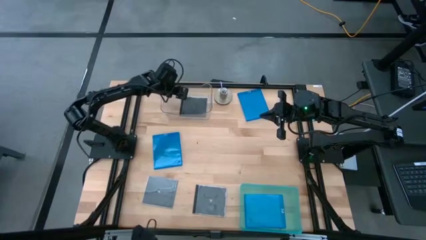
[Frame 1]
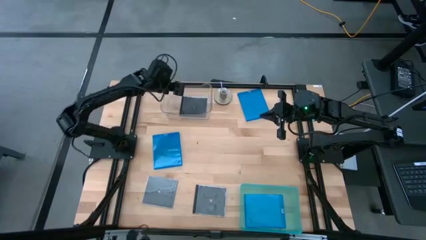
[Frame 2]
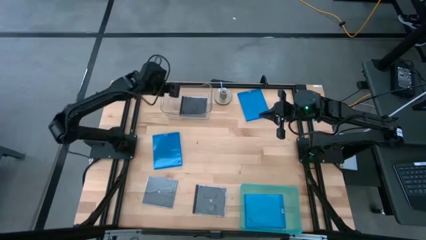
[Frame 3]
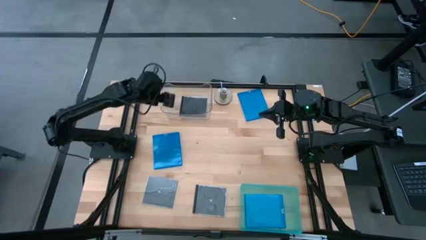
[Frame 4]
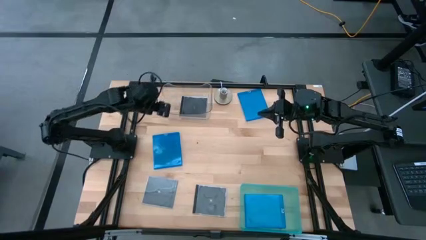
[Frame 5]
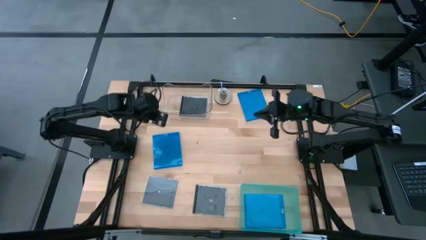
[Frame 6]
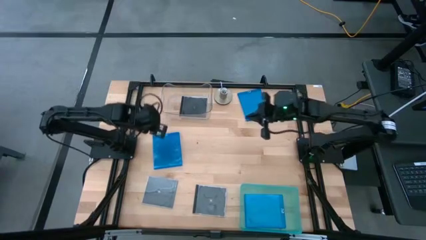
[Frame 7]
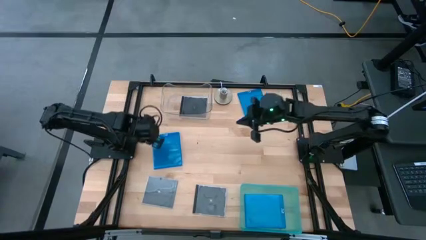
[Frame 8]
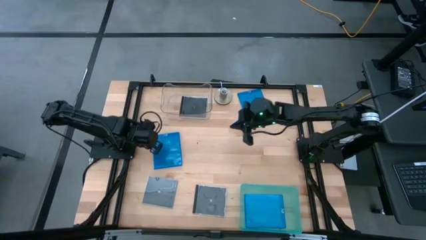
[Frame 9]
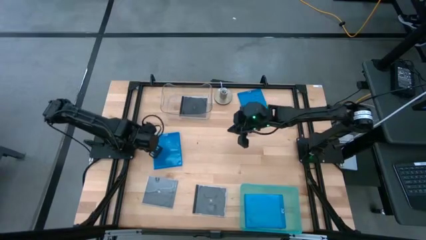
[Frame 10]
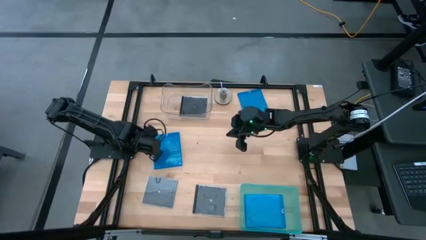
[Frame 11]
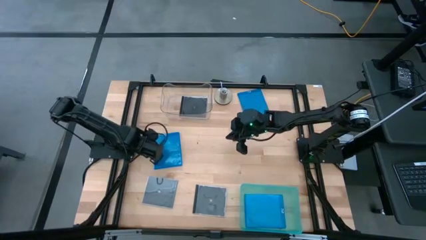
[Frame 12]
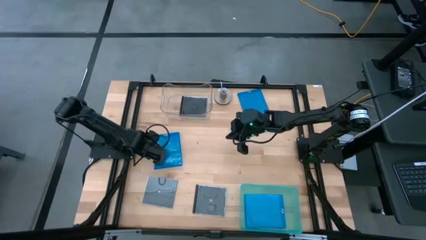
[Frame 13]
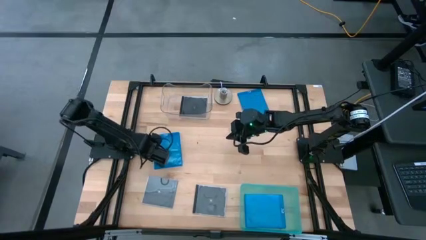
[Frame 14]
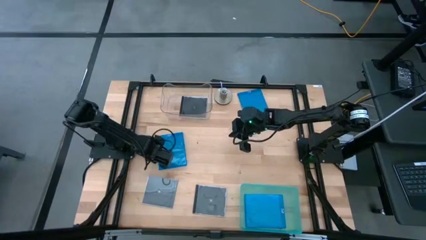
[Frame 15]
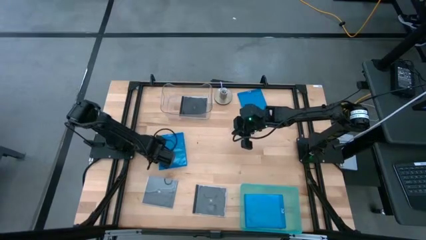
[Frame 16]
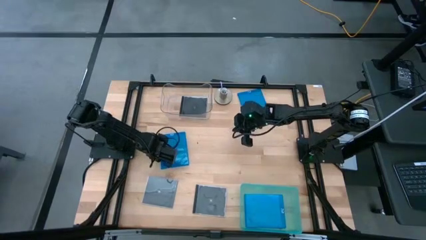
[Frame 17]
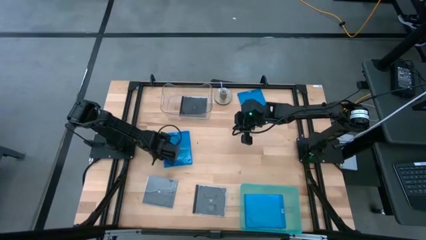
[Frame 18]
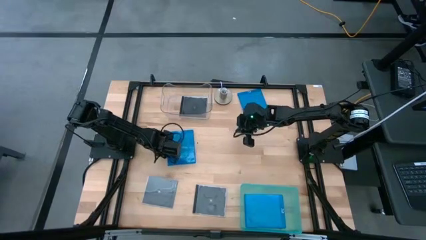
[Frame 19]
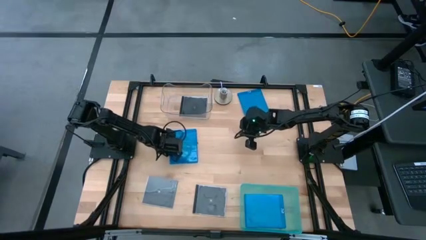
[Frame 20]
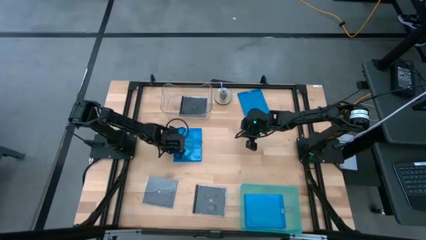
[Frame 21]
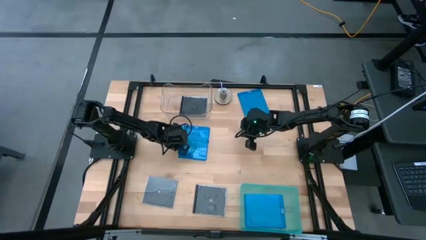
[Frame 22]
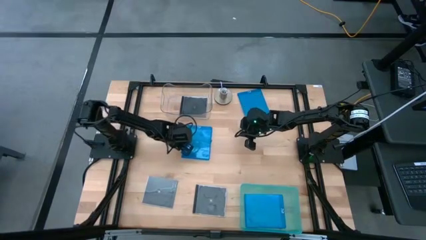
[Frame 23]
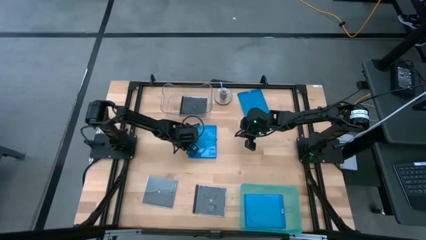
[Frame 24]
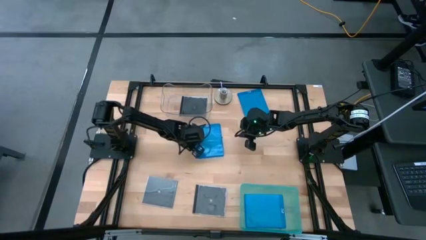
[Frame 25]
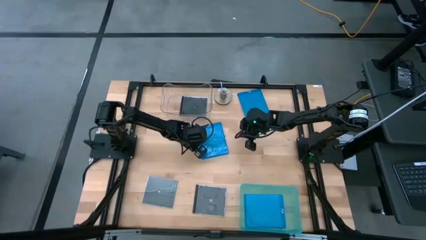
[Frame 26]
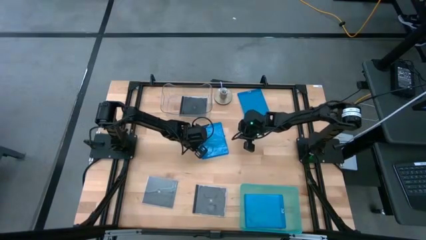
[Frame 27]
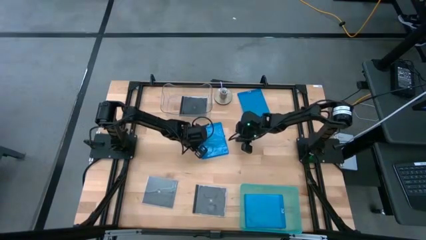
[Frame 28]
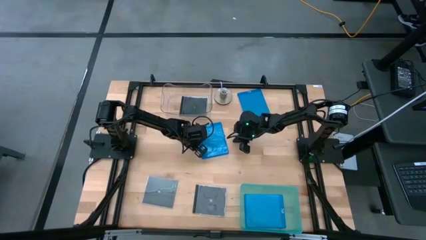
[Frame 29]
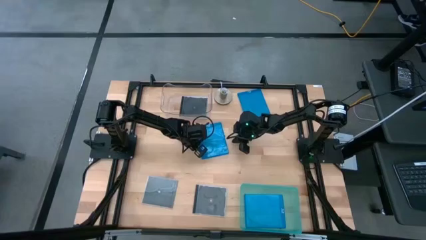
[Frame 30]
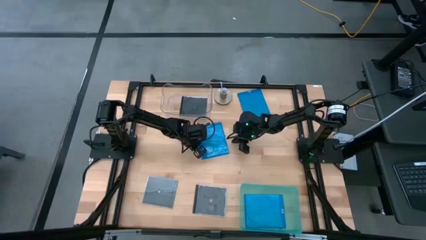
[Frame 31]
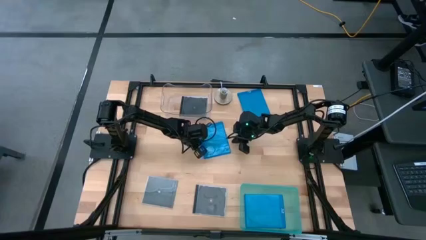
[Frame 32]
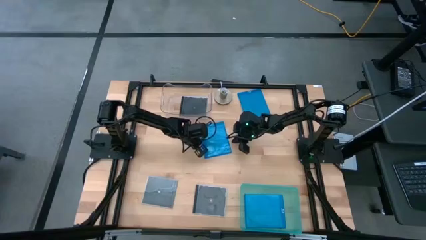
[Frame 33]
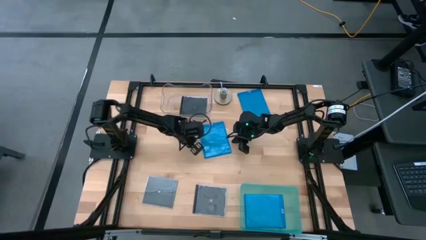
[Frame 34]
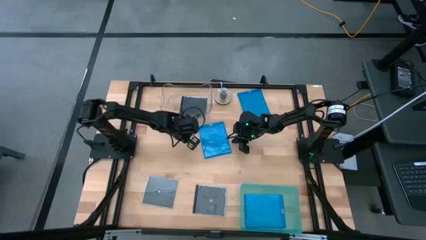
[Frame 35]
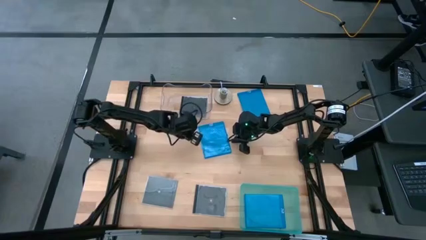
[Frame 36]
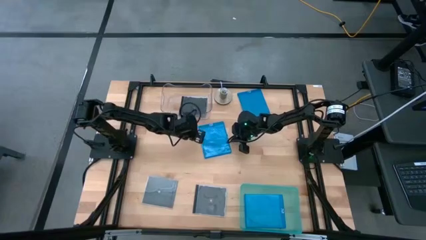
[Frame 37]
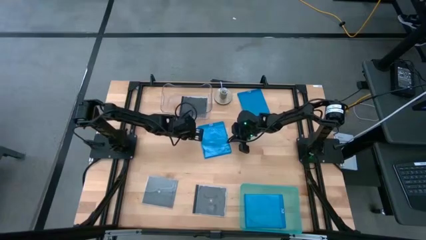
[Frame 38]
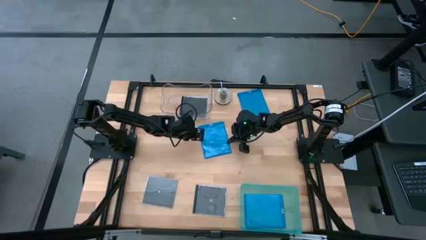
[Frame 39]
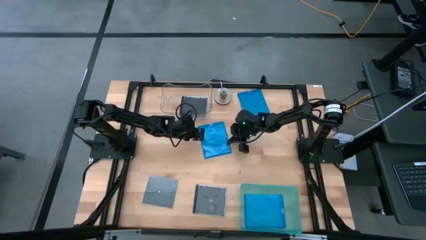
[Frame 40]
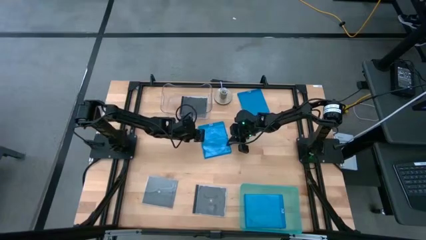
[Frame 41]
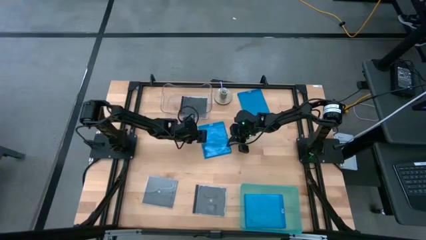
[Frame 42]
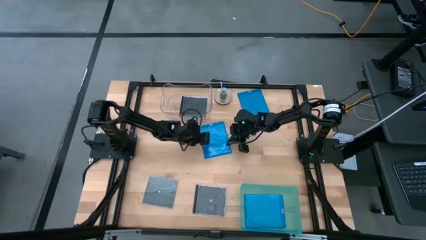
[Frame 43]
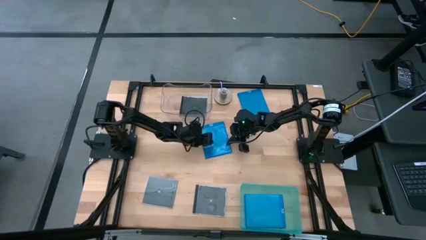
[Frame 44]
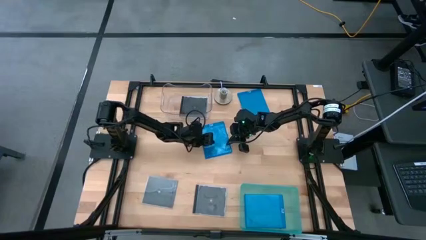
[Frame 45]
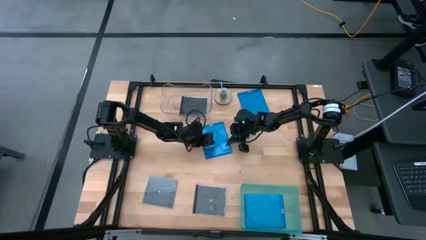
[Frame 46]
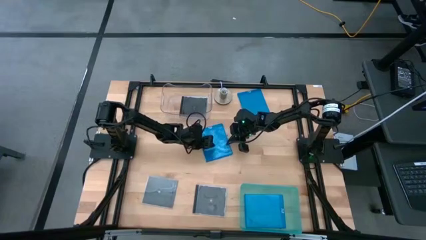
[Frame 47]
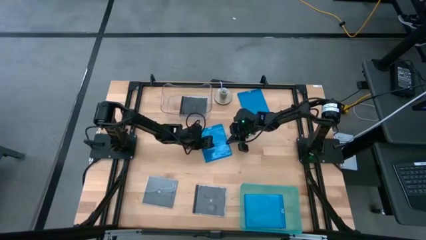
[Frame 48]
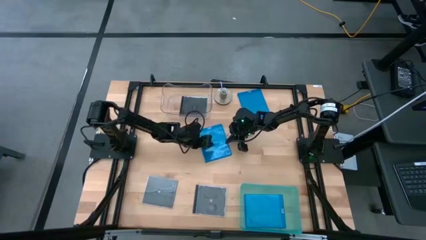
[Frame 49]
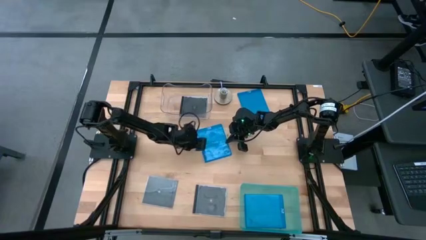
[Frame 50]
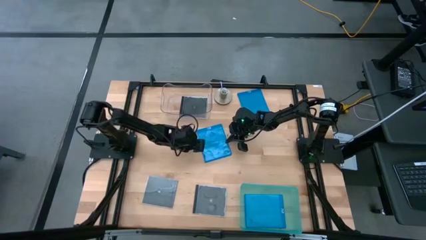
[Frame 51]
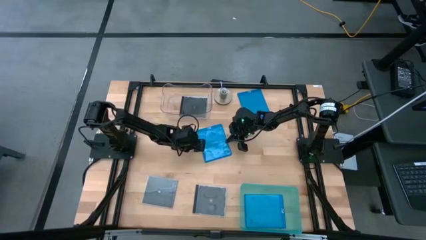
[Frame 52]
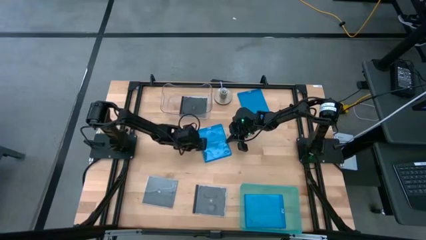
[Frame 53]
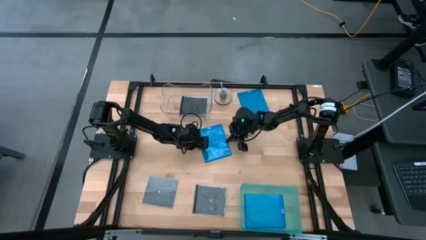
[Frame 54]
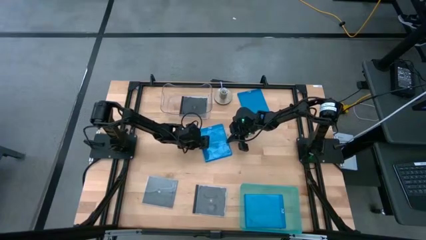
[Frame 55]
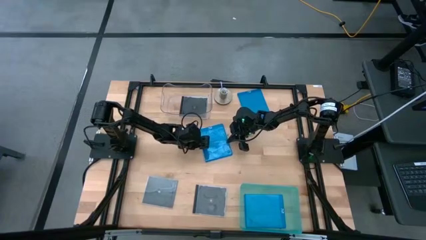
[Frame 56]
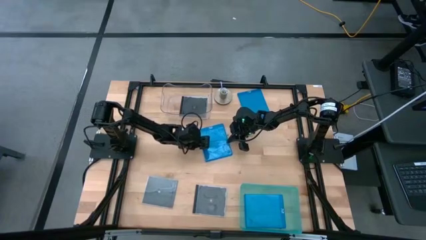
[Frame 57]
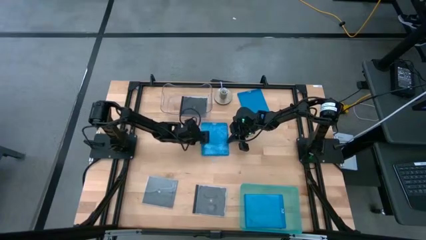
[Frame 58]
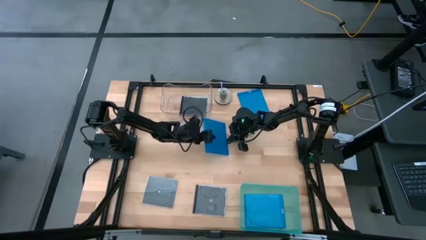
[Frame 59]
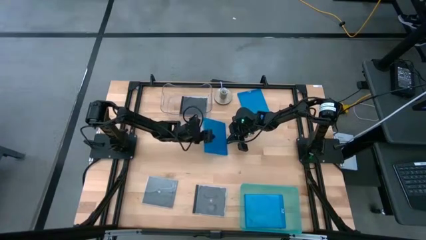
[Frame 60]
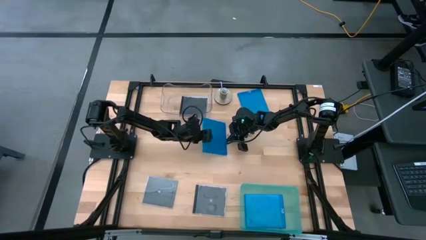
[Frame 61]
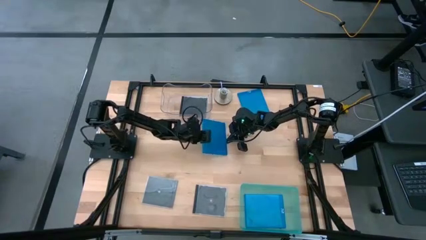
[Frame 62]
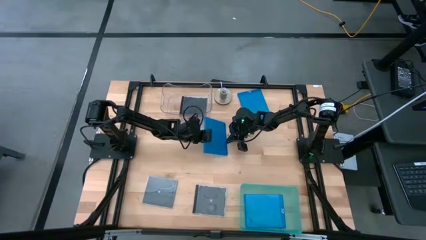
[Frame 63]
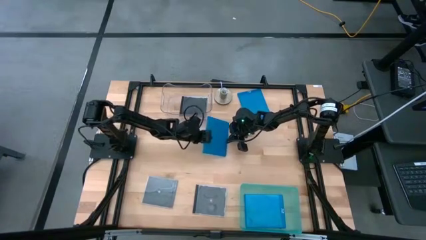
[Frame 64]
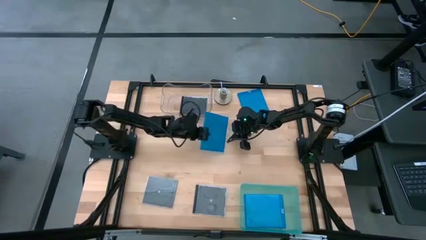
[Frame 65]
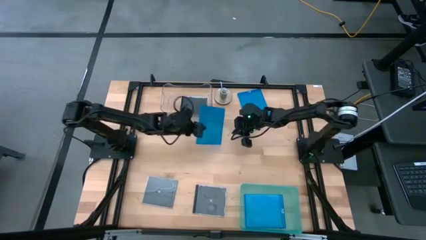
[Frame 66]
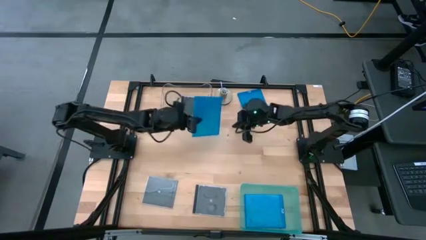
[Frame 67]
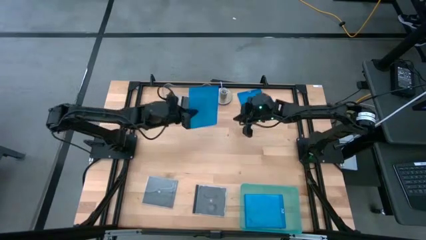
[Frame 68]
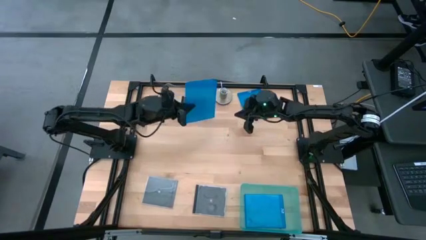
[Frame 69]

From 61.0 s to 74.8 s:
Task: Pick & place jewel cases by type
Put the bottom blue cd case into the green bin
